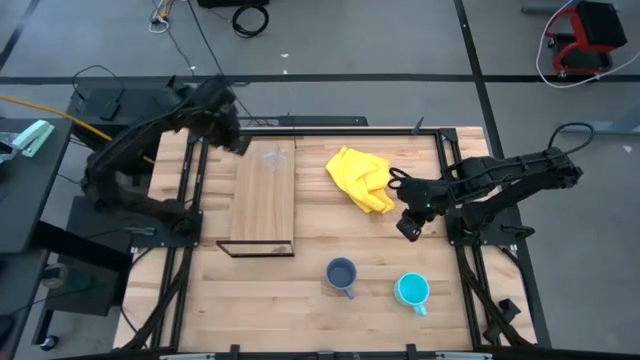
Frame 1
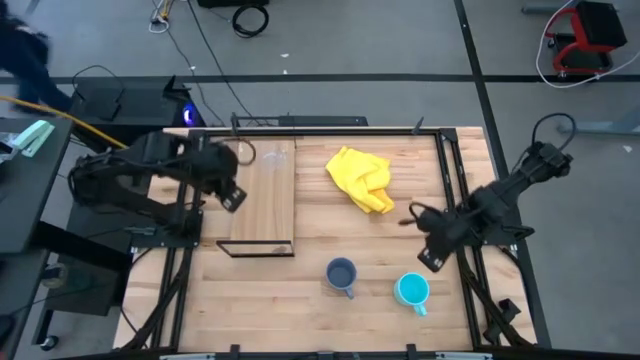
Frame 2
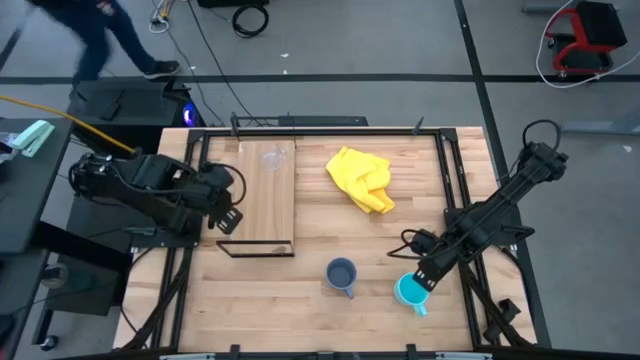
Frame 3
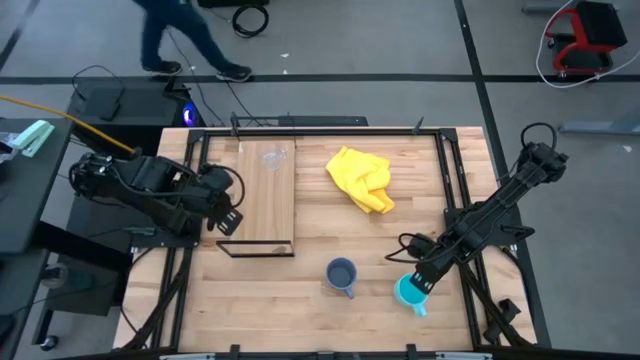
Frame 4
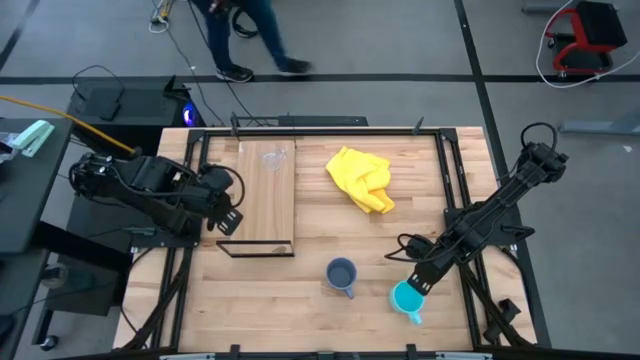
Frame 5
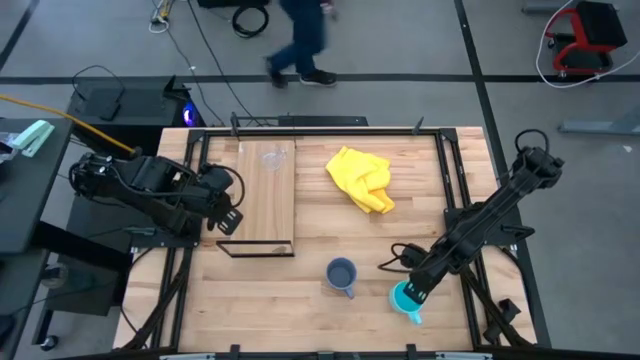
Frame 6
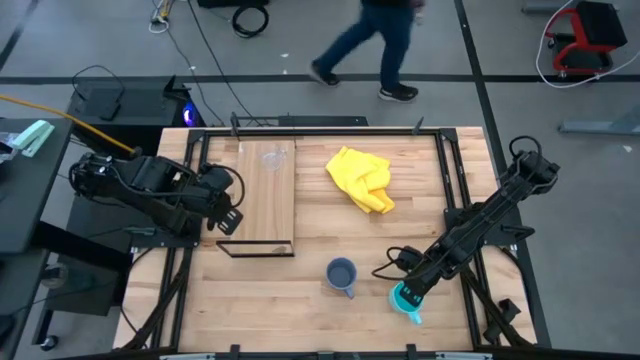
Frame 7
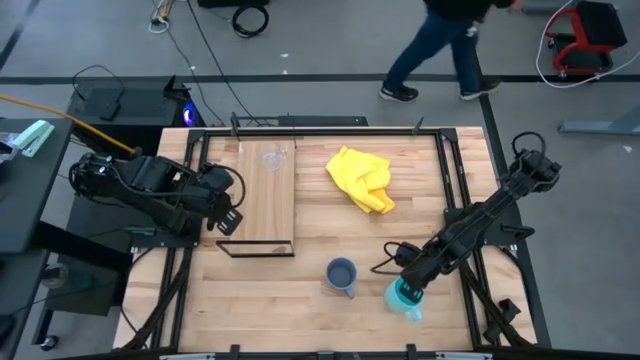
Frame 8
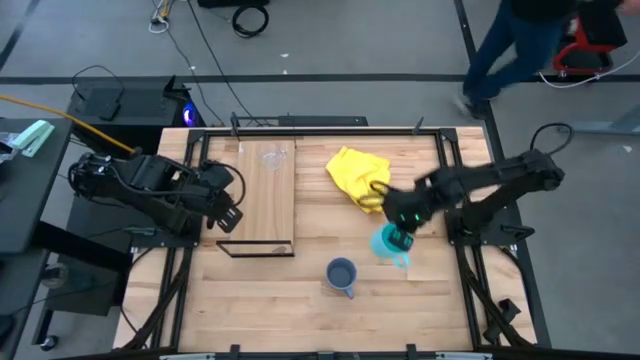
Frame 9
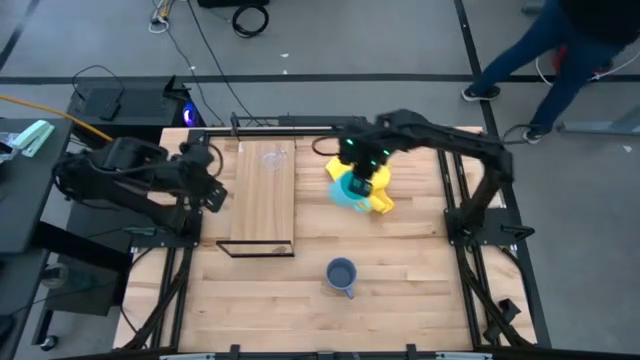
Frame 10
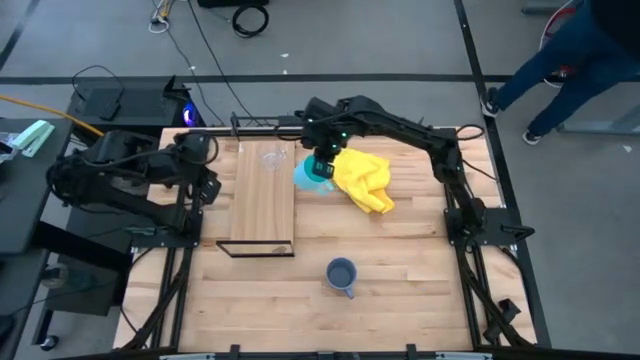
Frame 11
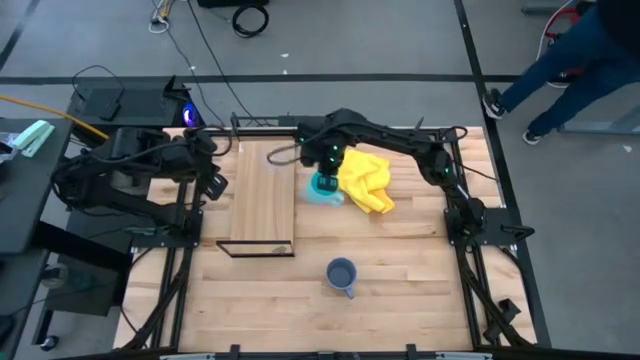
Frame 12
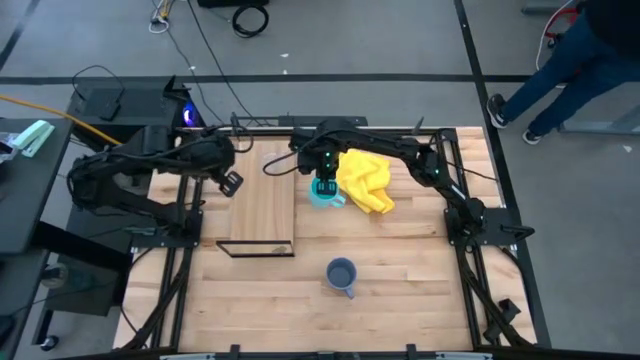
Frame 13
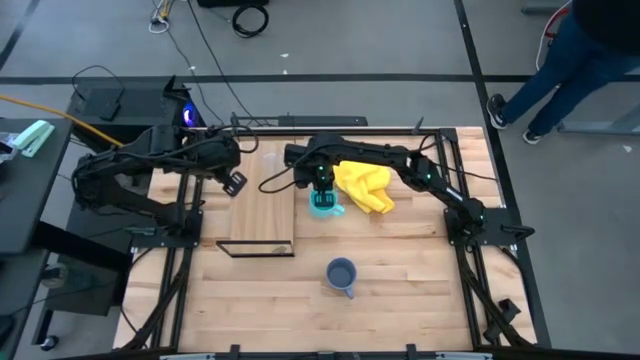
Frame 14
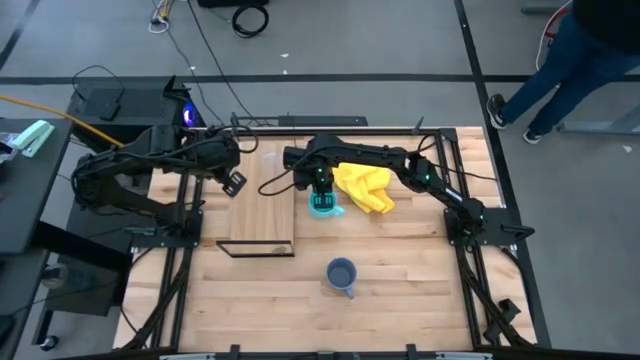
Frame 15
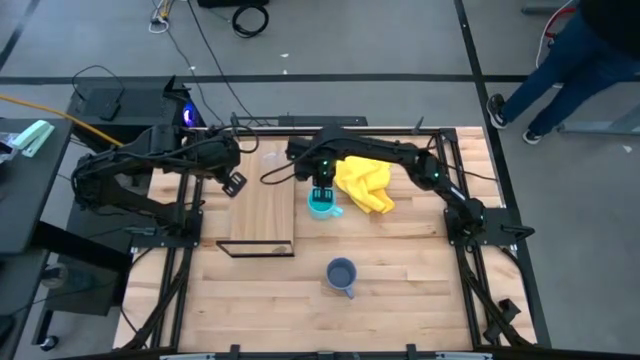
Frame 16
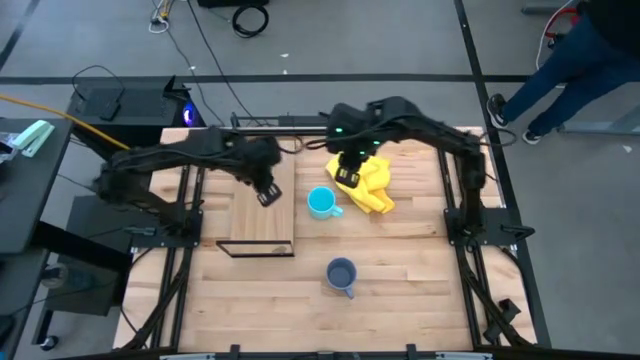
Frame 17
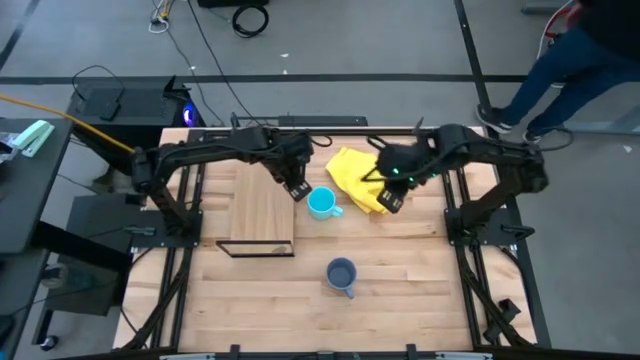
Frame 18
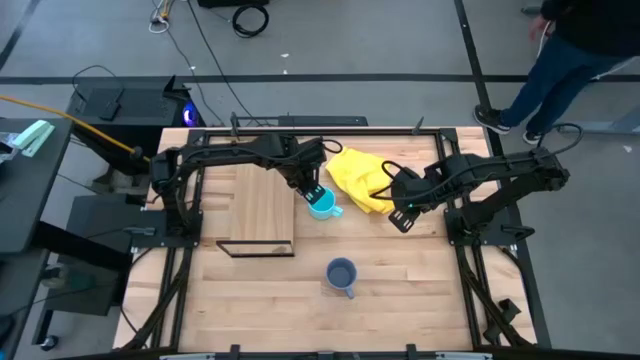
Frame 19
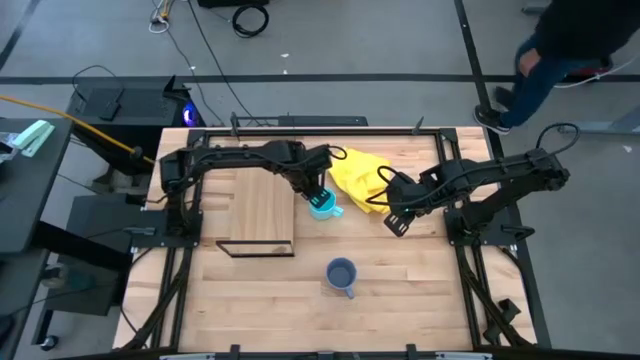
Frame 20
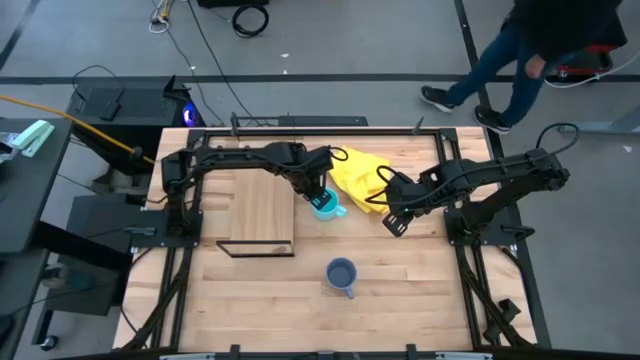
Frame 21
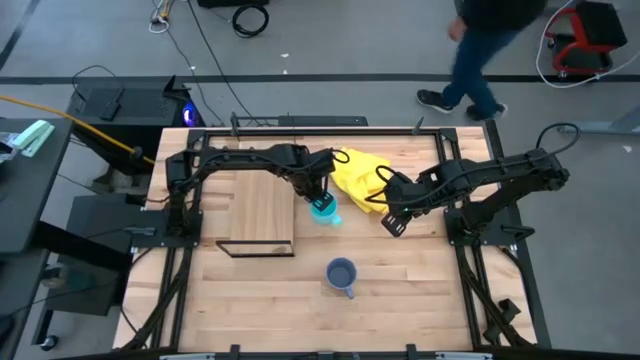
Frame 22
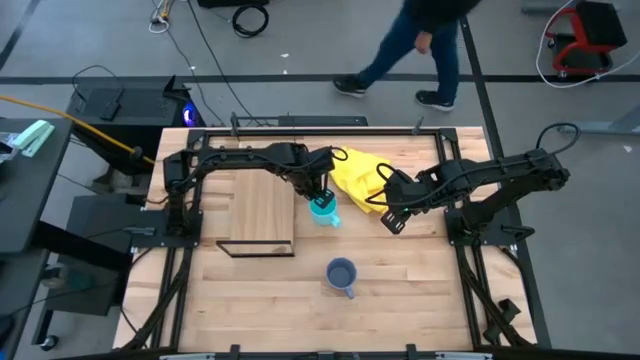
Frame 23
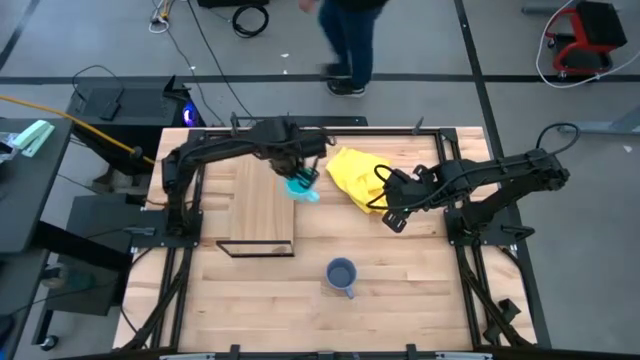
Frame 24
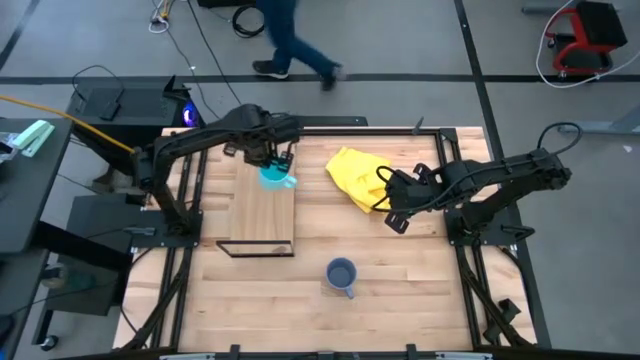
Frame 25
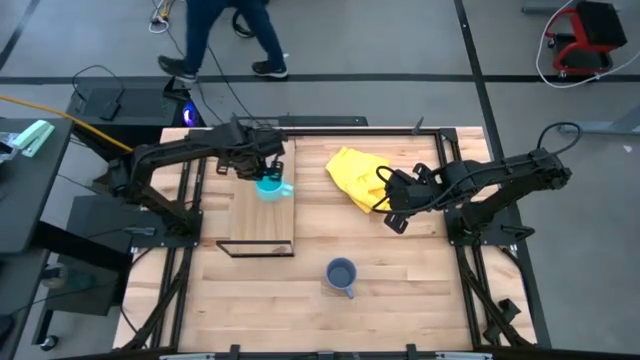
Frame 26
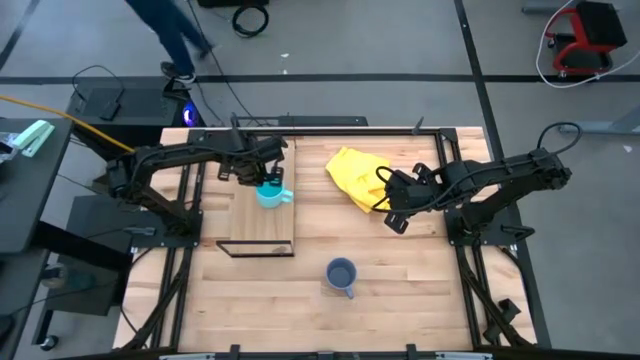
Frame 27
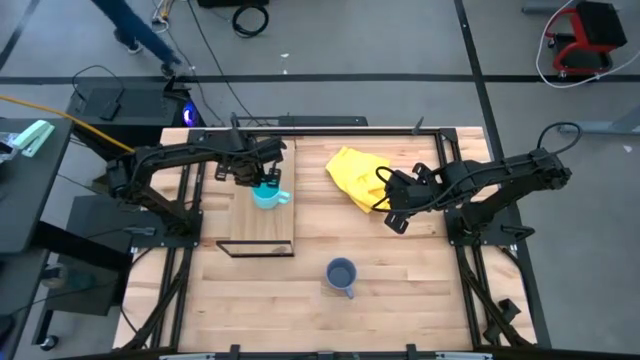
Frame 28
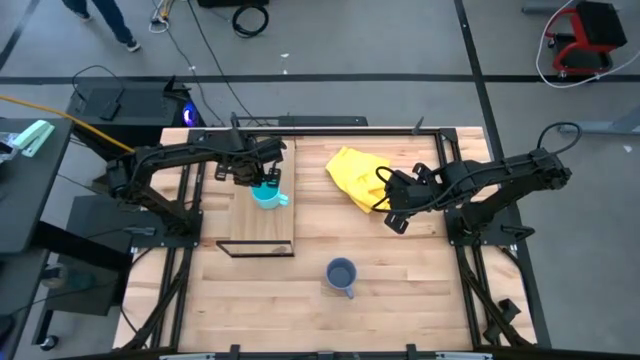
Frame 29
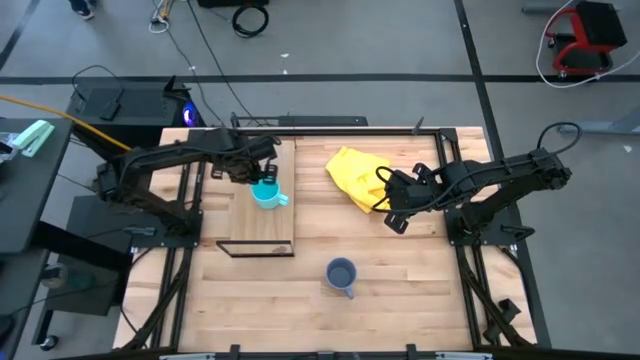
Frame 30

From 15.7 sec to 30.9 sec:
Task: Stack small to large cups/mugs on shelf
Put the light blue mug on the shelf

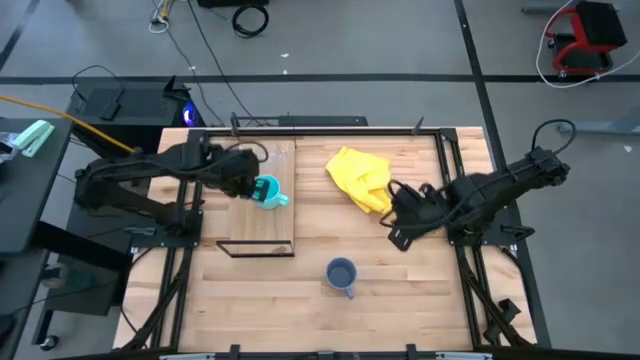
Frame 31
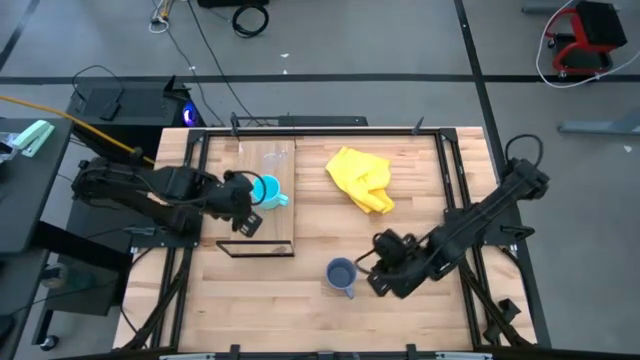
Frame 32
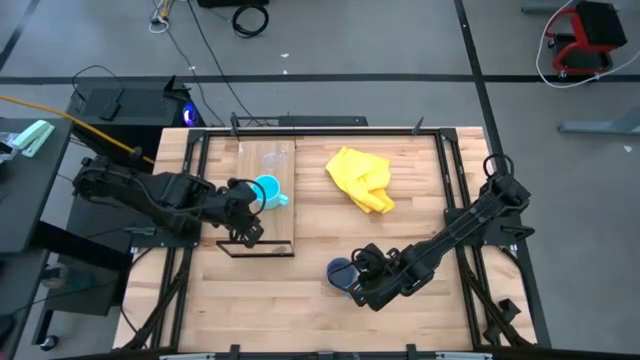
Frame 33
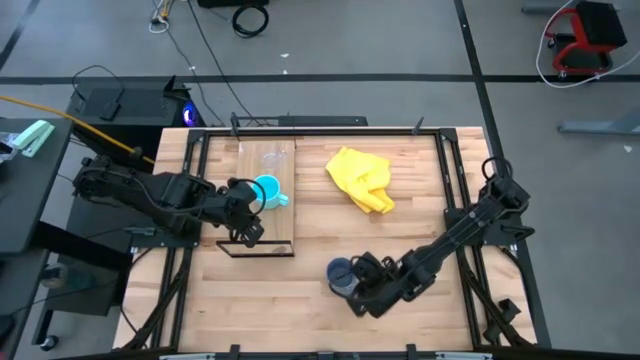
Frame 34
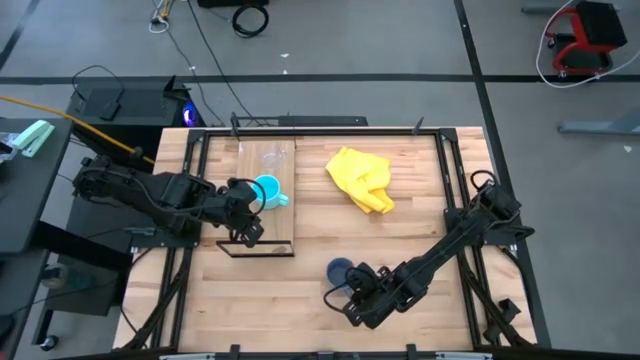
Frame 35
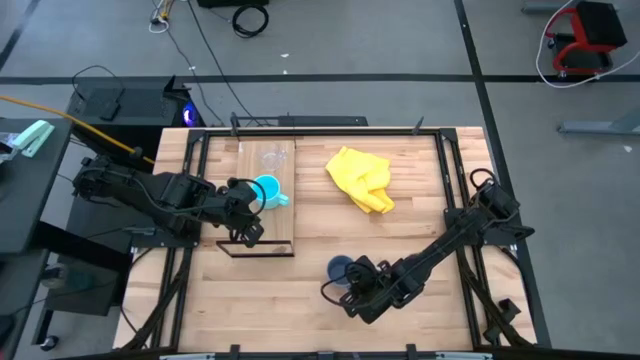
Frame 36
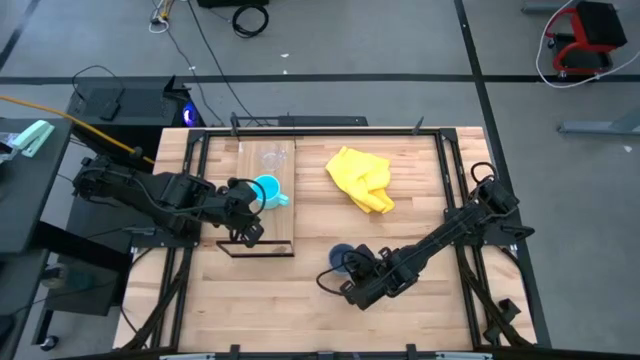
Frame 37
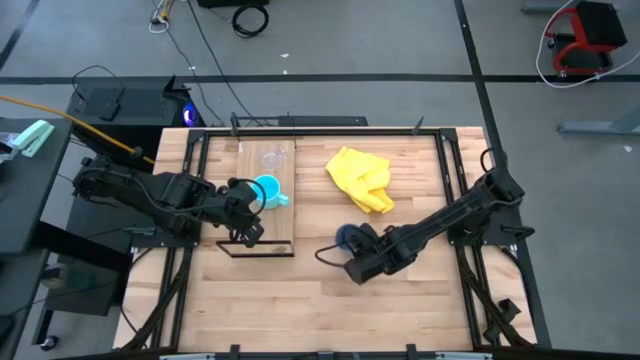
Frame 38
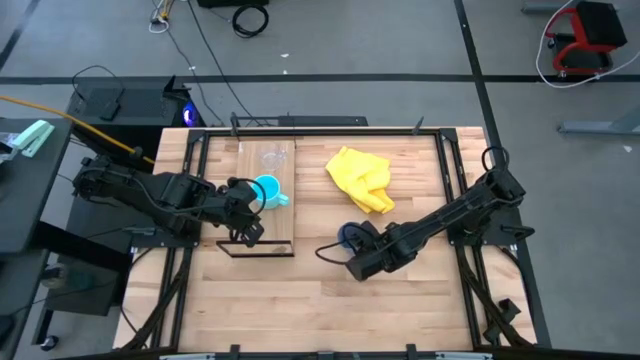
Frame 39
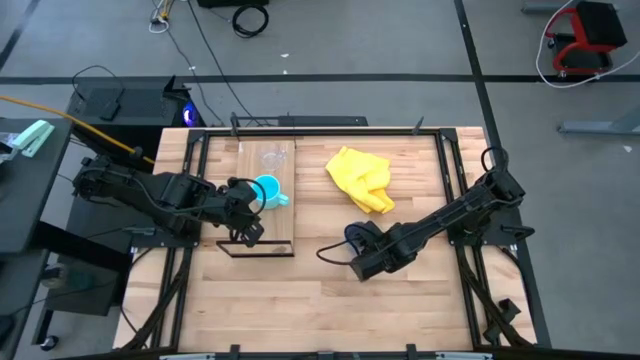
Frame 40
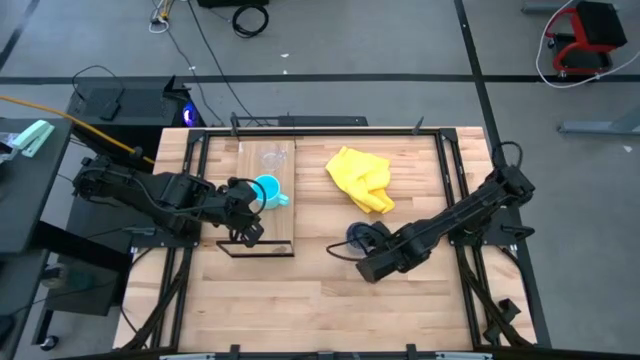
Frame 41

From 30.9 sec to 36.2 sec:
Put the blue mug on the shelf
